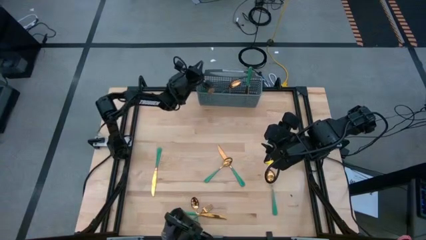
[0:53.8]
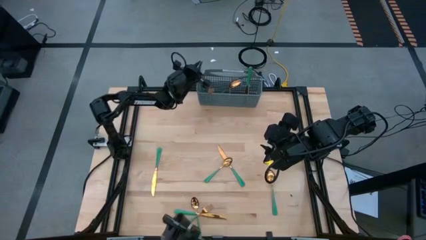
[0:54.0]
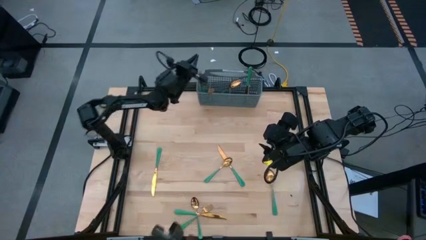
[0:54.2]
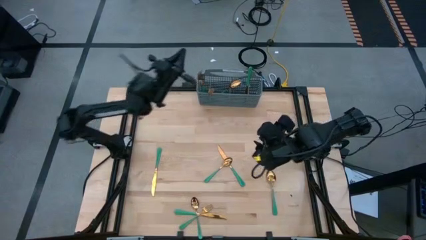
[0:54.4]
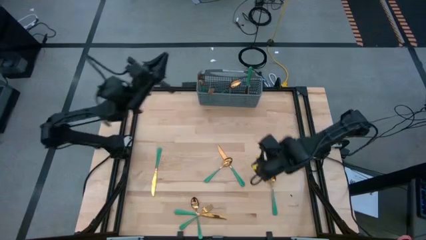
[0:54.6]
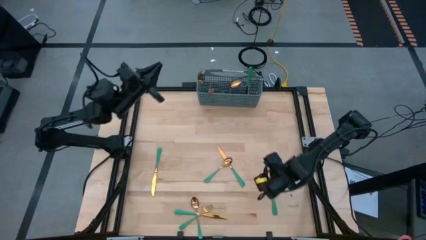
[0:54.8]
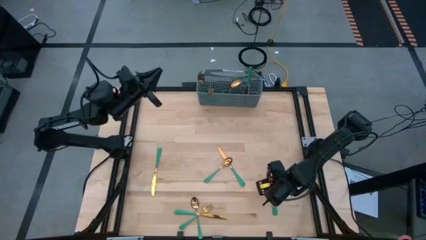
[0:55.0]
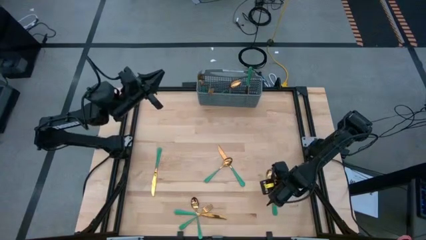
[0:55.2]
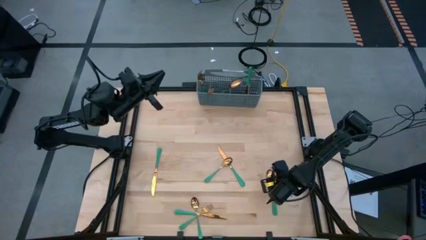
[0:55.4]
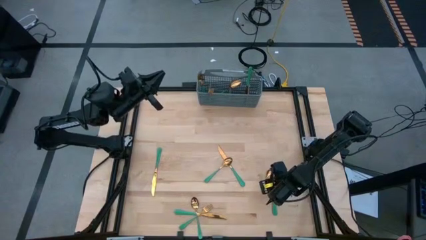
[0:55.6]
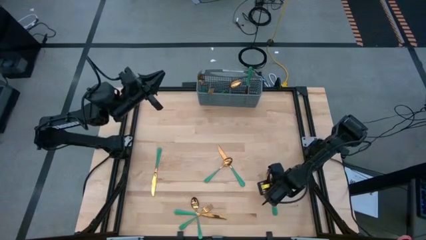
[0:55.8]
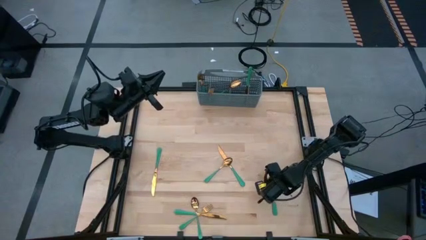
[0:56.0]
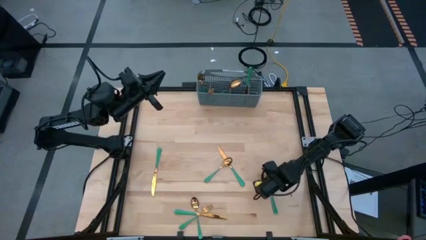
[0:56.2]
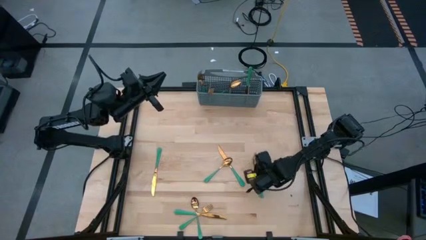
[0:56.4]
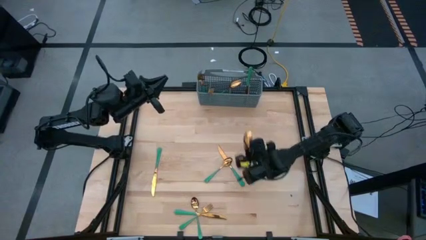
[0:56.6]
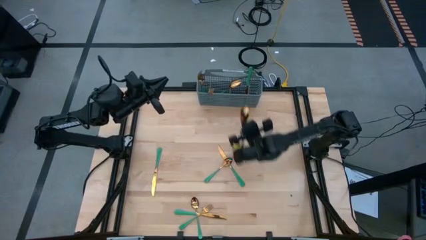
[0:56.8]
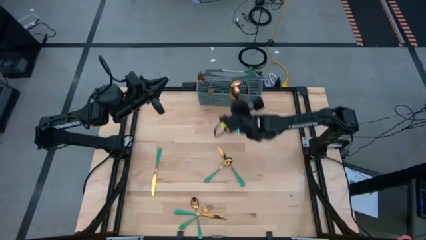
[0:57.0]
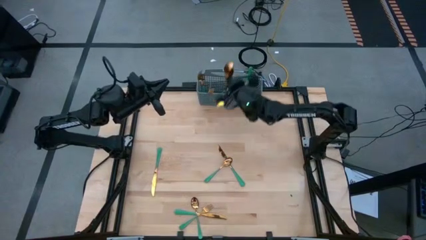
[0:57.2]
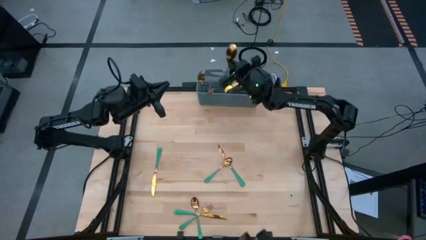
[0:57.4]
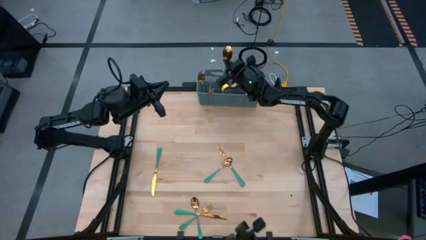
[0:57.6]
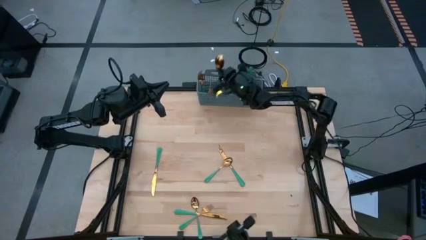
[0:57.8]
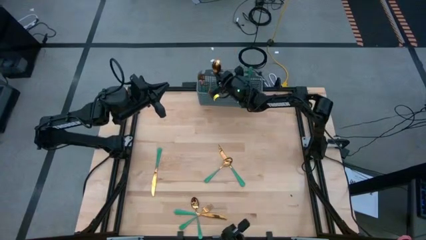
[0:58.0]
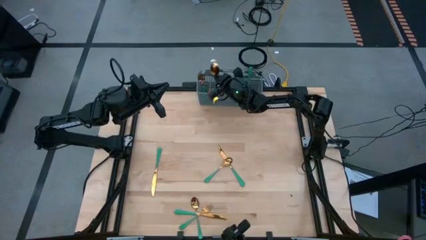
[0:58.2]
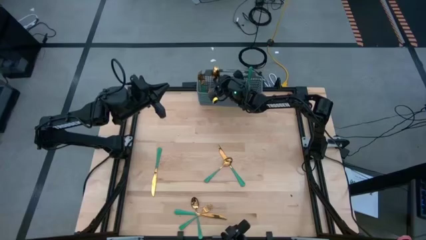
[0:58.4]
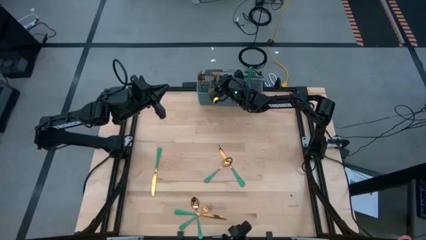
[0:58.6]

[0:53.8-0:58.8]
Task: Sort silverware
Put the green spoon into the gray silverware basket

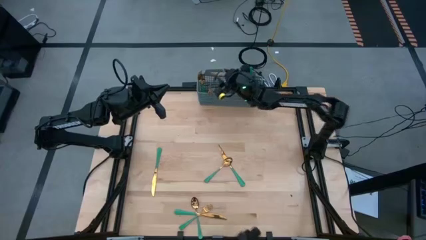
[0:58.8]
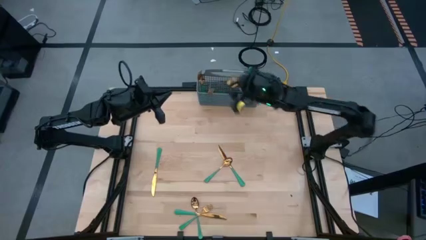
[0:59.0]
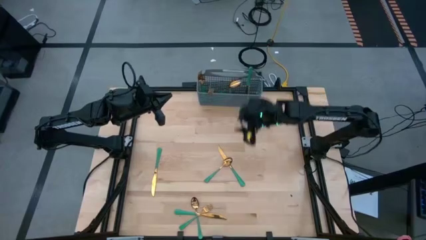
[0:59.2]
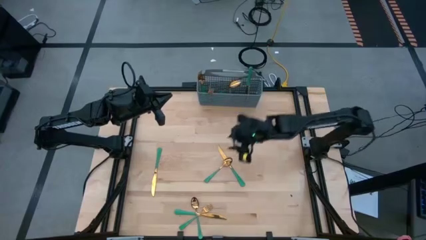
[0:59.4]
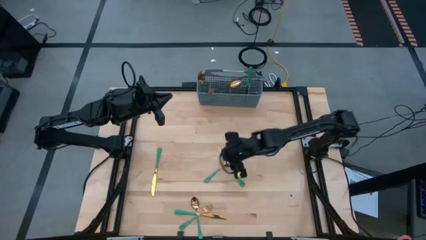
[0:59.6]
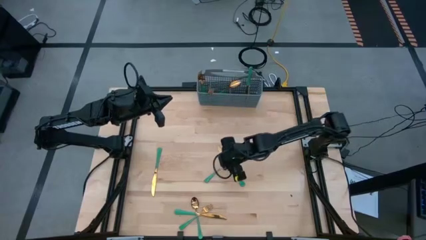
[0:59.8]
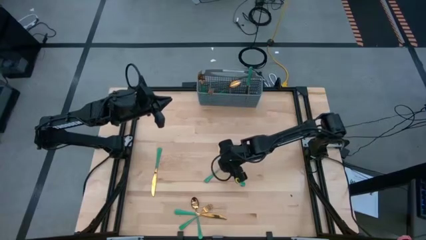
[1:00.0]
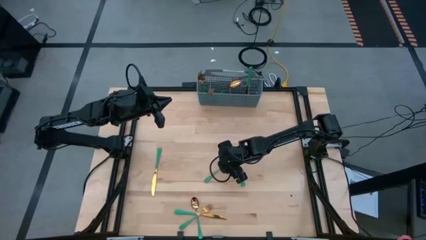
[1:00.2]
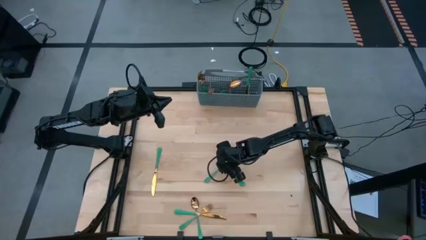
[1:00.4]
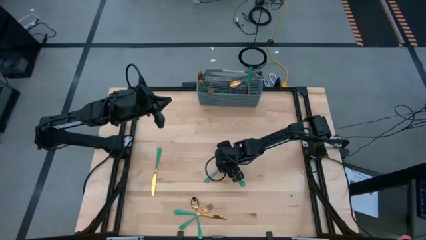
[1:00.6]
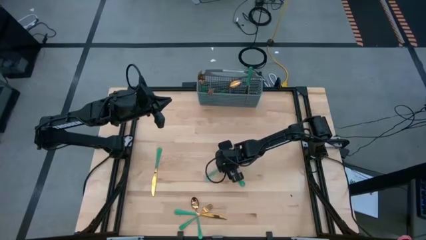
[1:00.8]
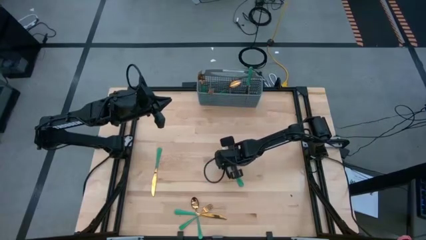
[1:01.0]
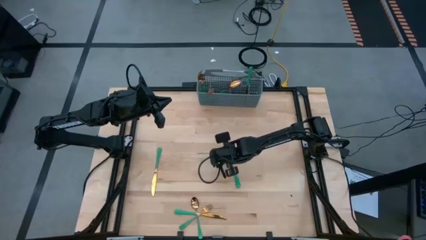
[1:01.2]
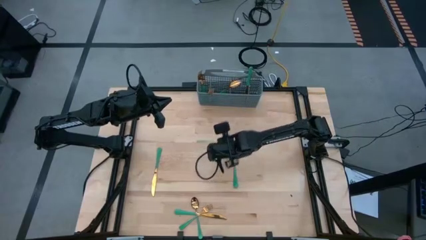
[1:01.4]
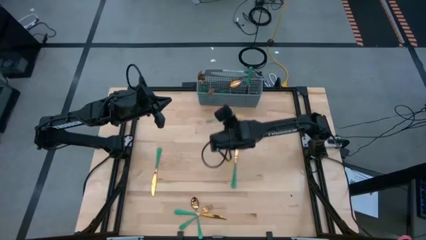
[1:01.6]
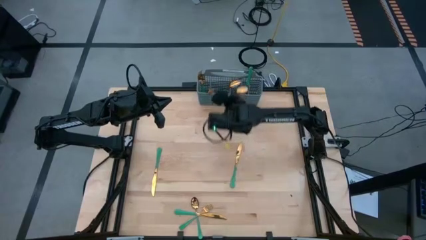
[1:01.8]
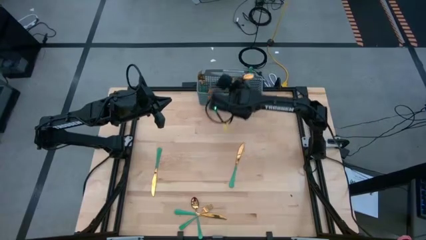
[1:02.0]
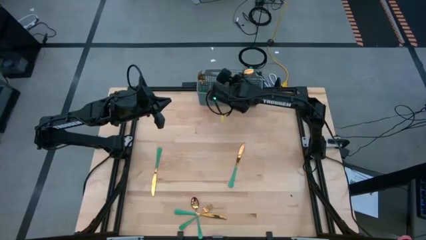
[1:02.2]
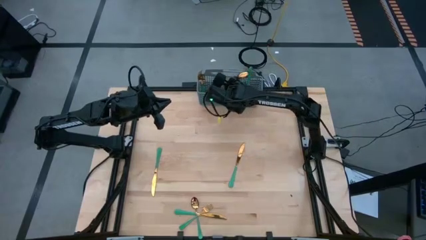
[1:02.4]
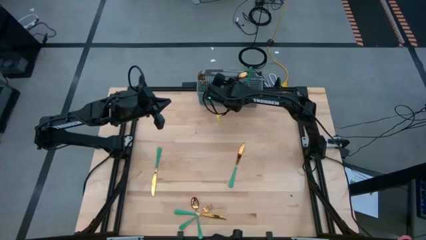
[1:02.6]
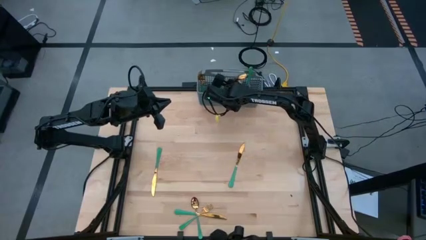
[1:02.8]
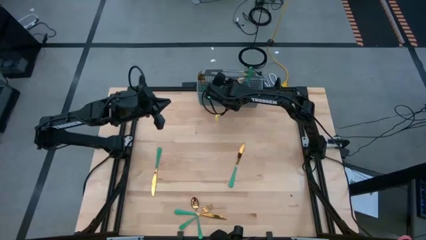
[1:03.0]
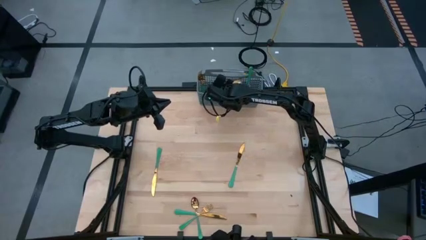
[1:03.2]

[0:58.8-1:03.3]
Put the green spoon into the gray silverware basket with the other green spoon

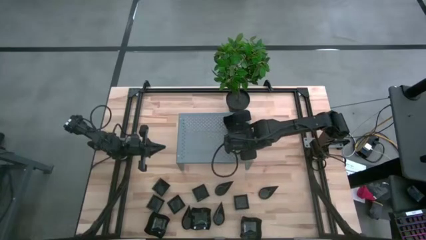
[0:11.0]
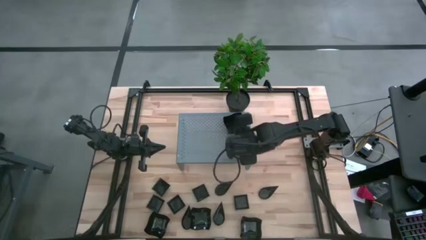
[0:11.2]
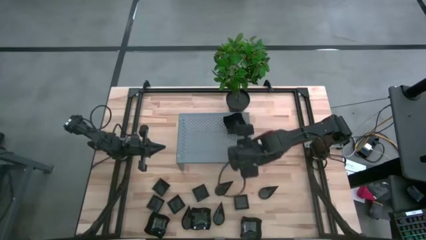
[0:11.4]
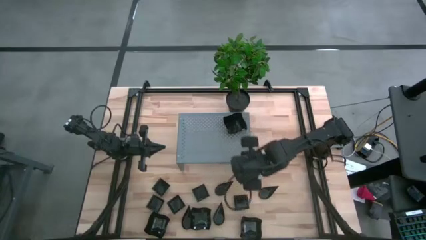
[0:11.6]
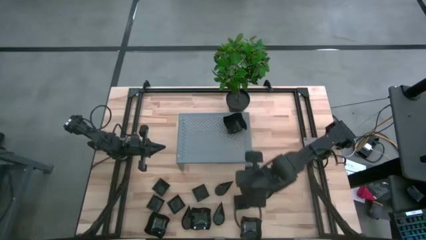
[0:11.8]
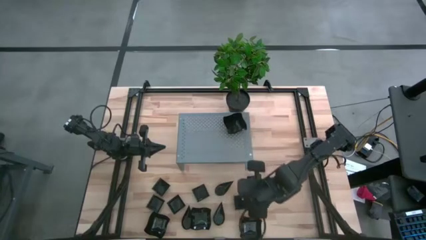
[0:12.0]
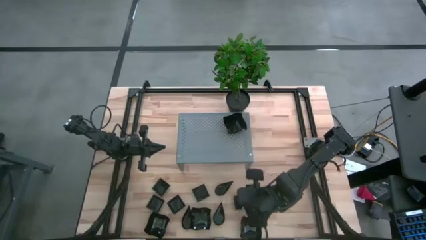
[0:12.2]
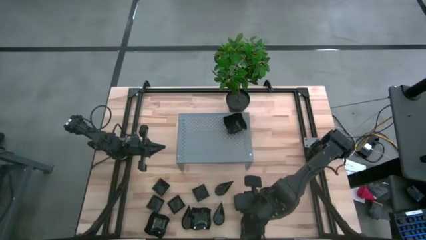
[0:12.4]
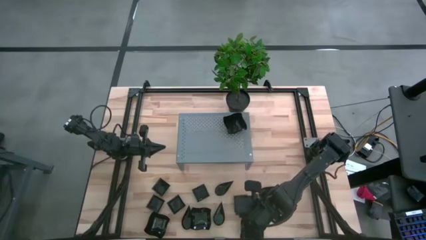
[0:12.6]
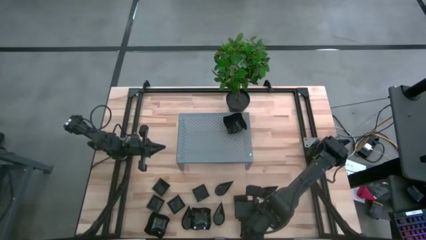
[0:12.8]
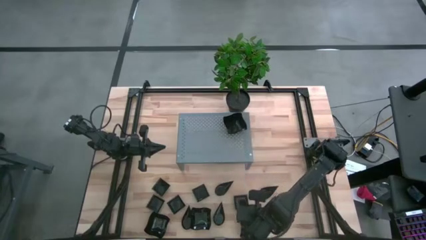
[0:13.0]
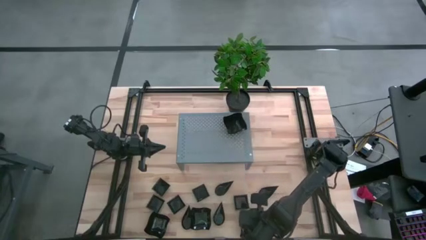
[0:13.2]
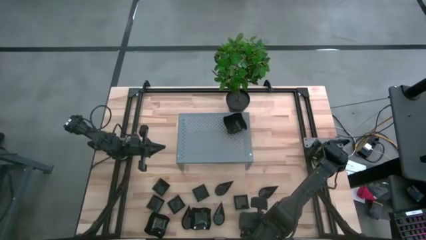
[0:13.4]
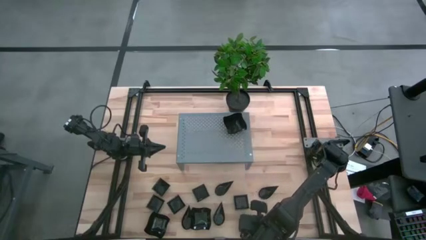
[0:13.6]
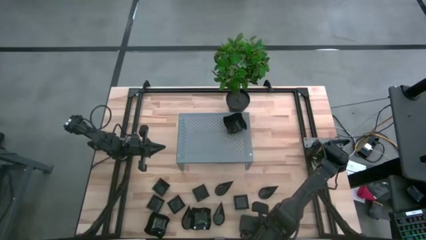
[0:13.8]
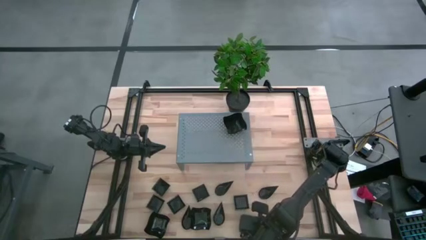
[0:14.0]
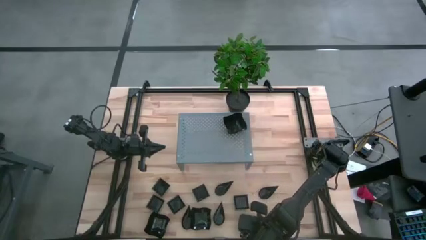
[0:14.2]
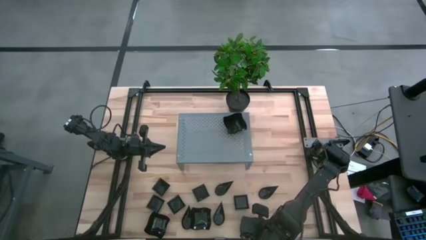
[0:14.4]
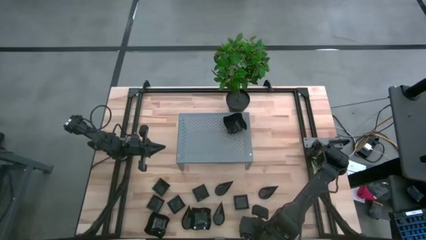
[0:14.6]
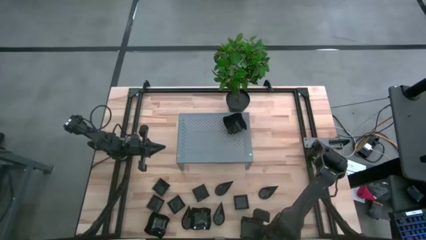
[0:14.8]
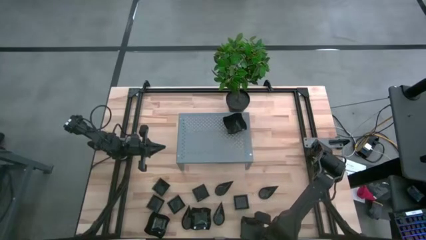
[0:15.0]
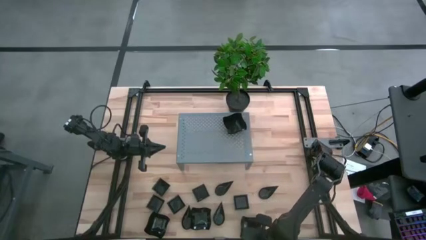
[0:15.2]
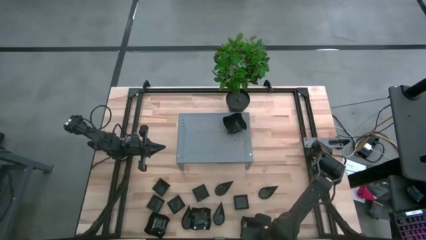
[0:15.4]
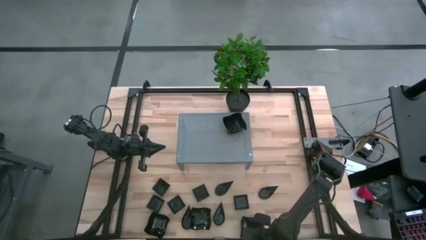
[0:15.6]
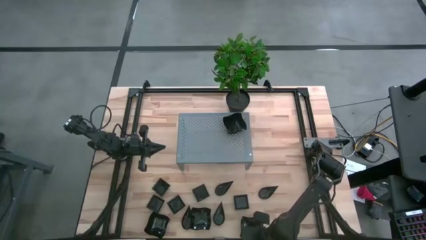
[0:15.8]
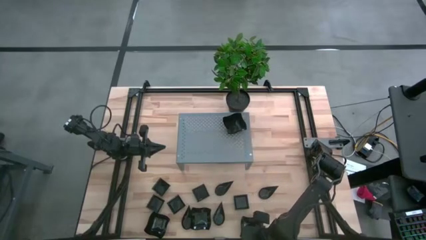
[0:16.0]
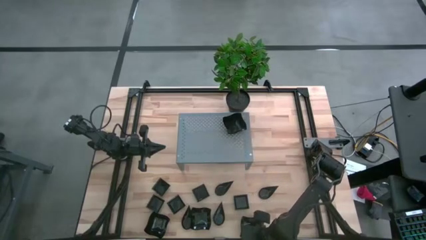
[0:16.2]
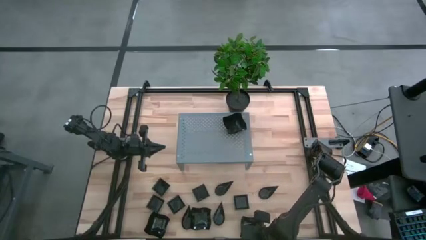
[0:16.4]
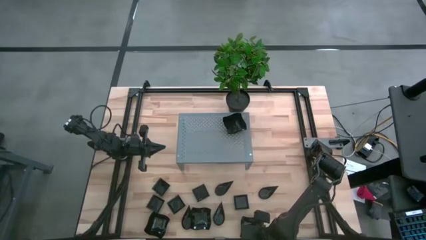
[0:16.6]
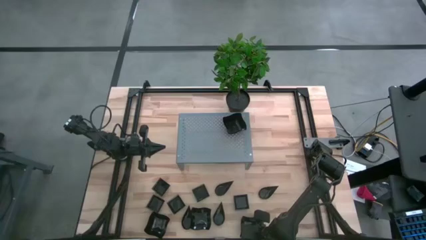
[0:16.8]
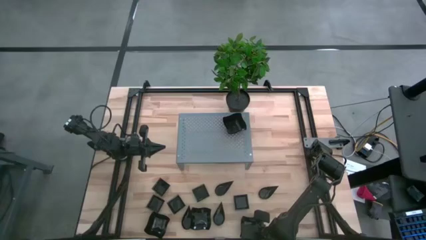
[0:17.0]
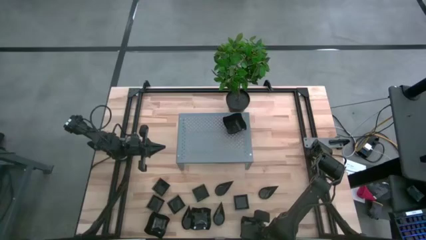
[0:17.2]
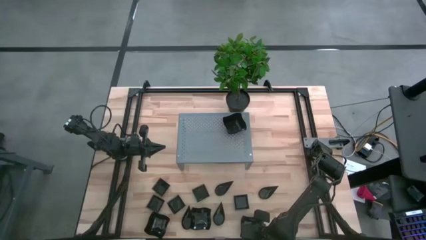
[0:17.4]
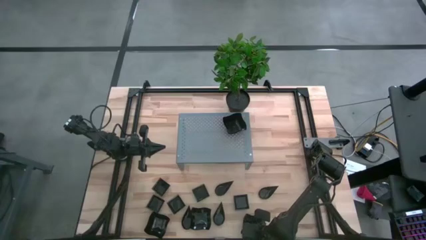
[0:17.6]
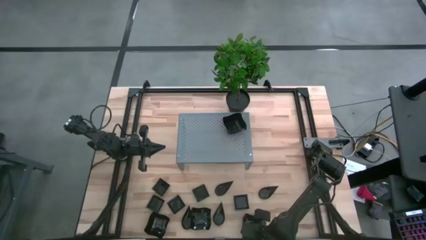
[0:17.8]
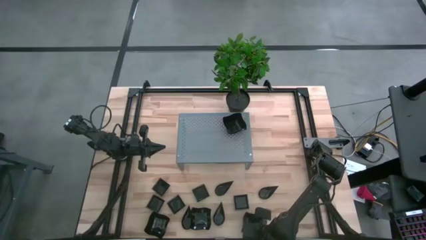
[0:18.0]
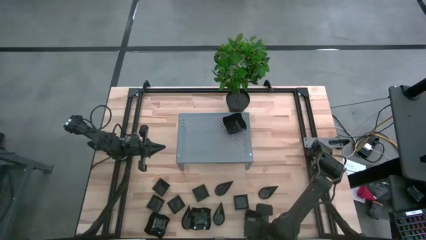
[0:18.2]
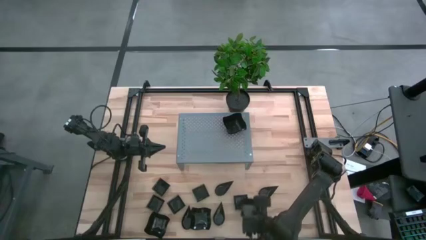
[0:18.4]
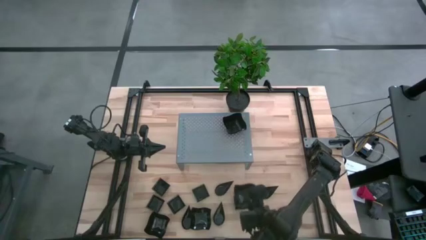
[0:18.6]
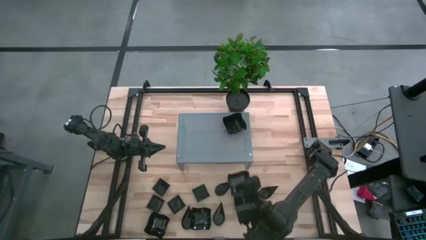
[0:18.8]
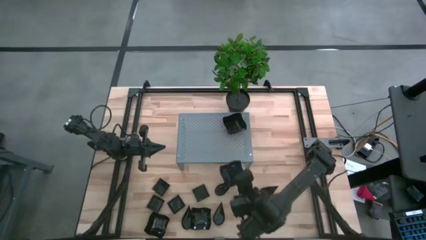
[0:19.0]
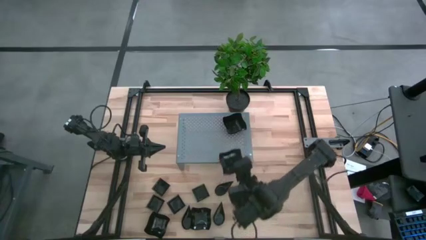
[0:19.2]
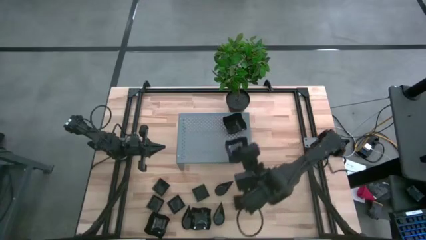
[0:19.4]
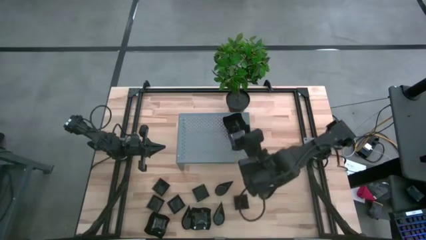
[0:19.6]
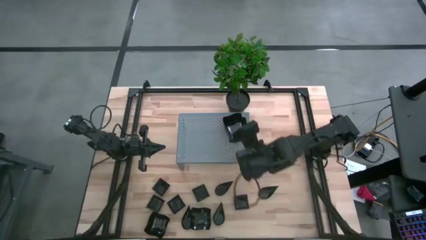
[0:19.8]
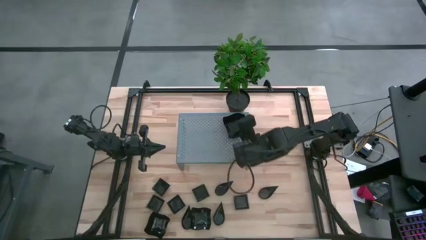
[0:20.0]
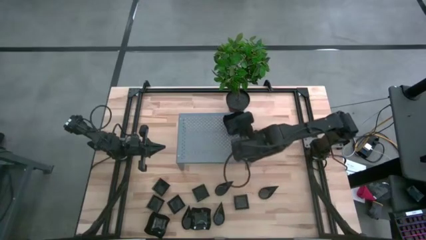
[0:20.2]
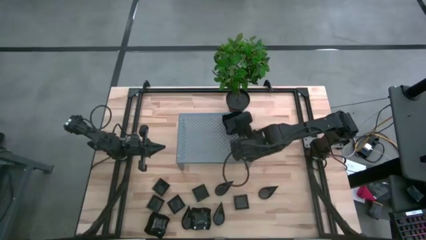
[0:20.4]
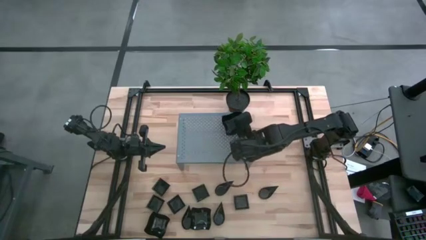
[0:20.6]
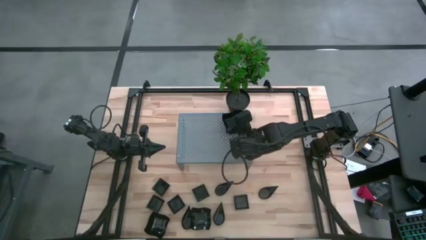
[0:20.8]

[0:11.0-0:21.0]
Task: Pick & Place Mini shaped plates
Stack the black distorted square plate on the black distorted square plate on the shelf
